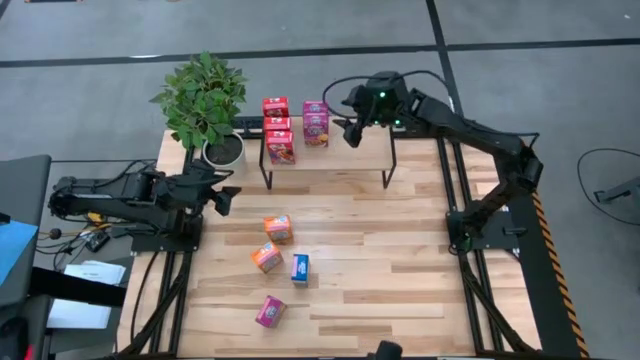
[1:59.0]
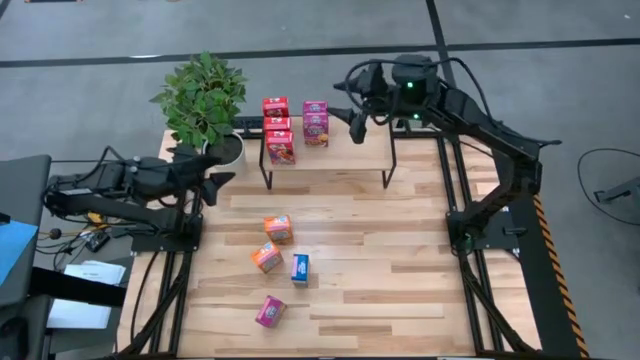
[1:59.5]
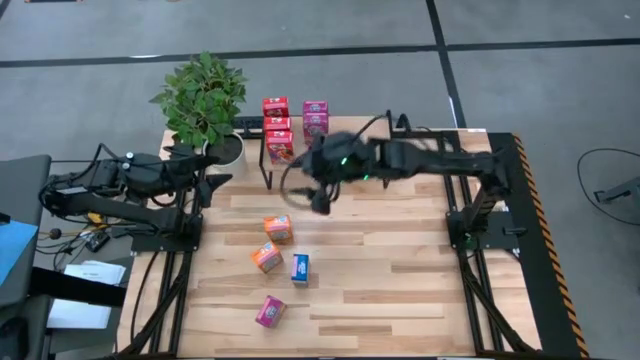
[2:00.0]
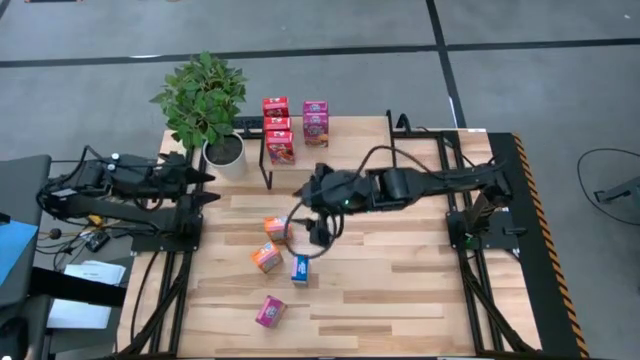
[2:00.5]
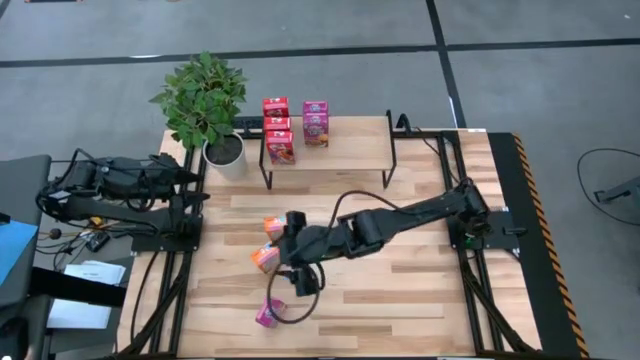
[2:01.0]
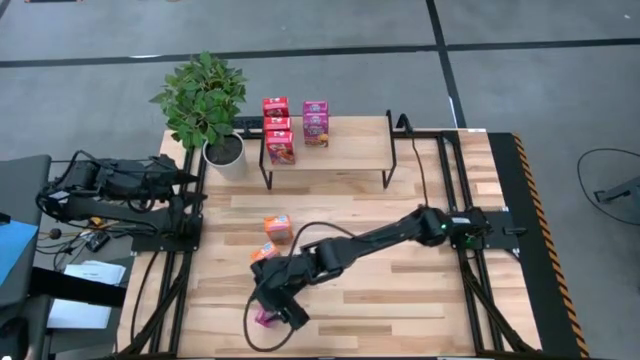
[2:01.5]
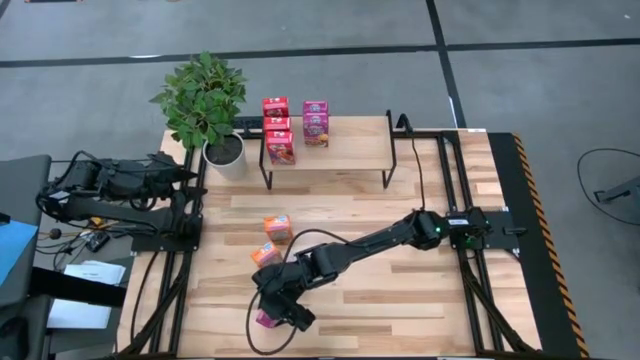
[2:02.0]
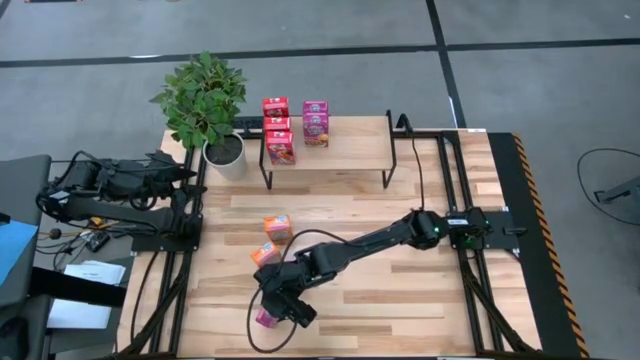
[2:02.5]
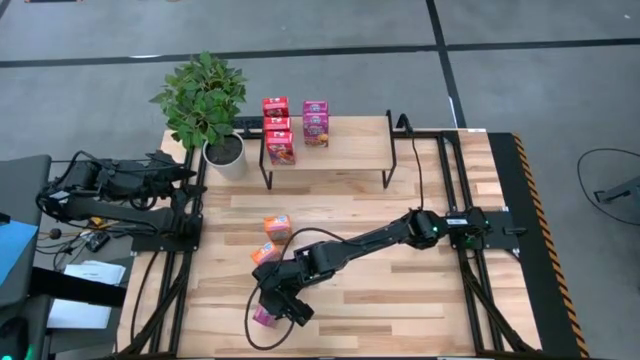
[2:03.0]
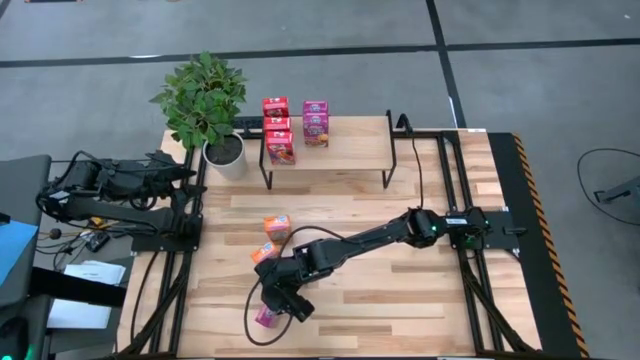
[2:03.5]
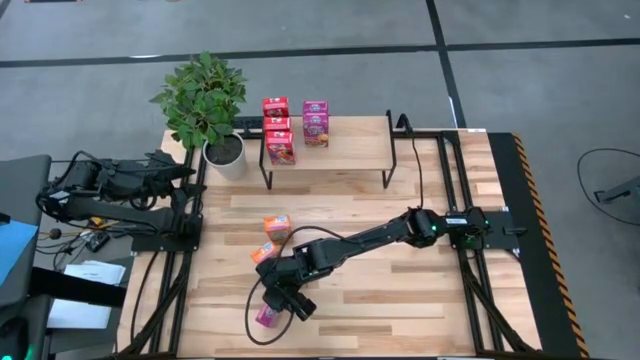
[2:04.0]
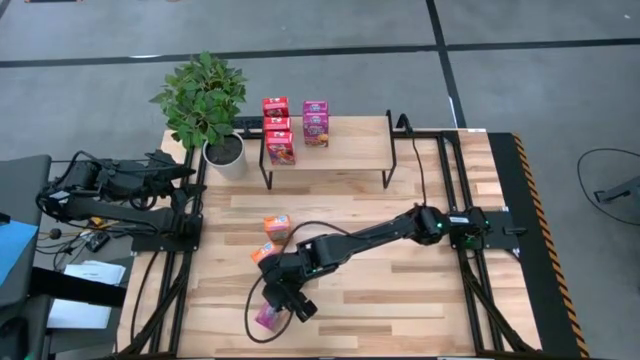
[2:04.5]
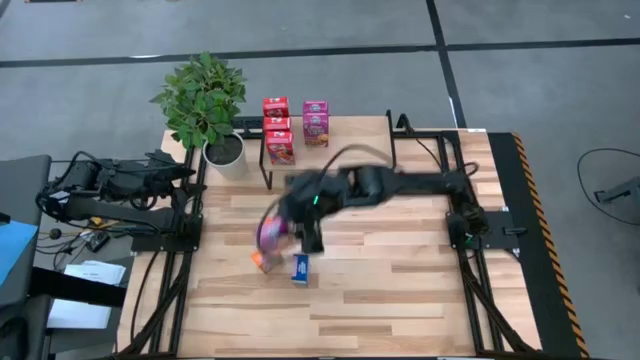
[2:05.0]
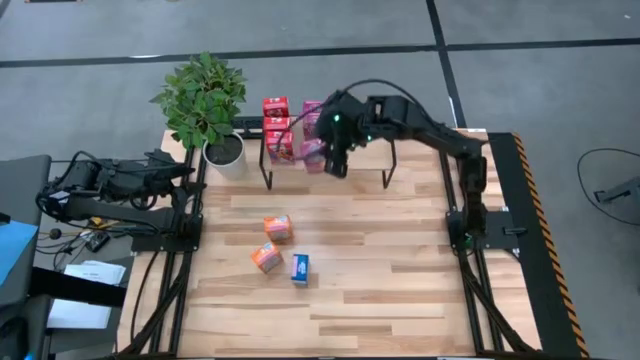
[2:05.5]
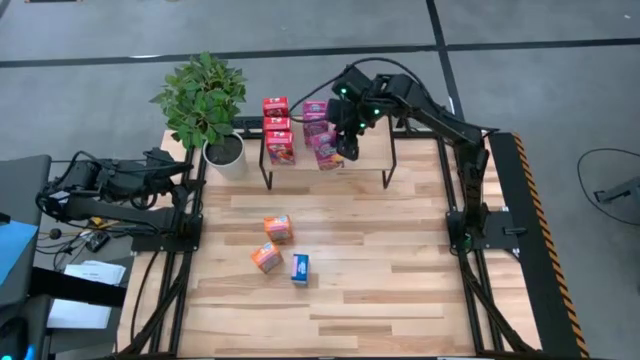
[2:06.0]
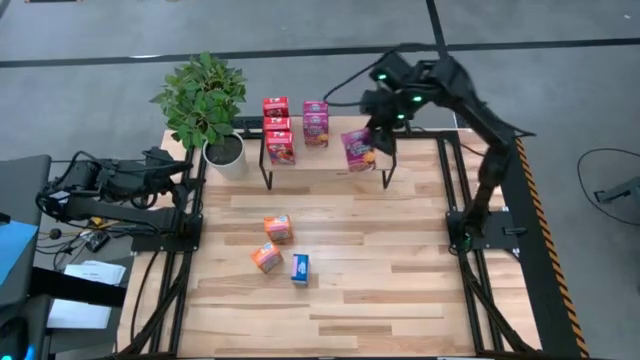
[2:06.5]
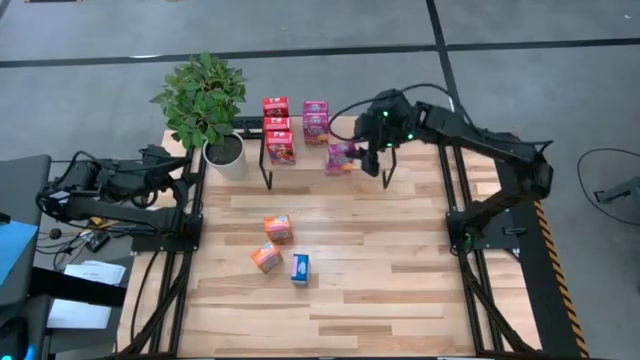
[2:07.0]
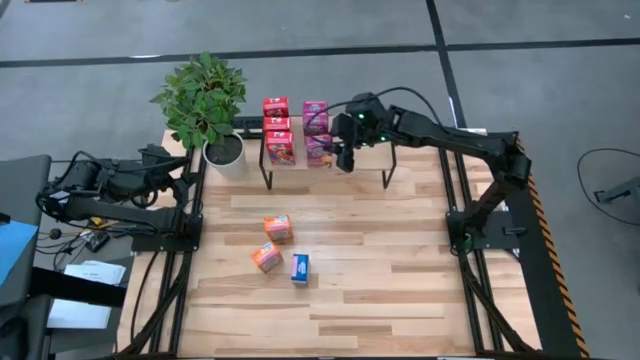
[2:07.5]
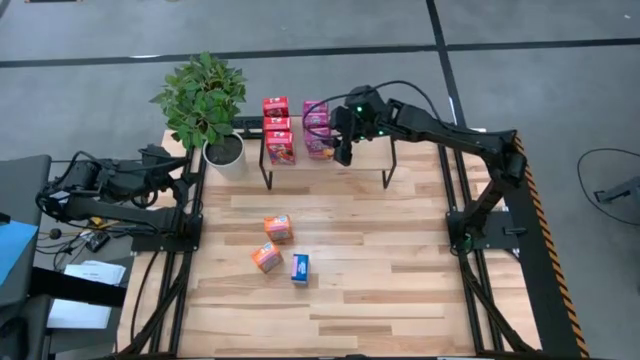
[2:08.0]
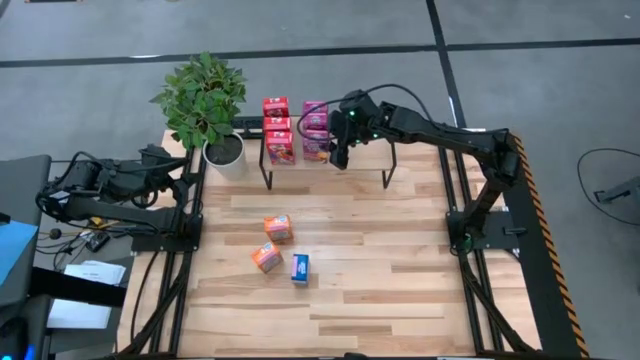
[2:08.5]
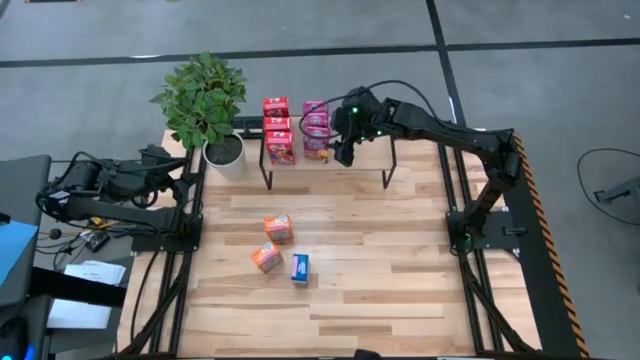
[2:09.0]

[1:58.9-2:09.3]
Task: Stack cereal on shelf
Put the violet cereal box on the shelf aligned with the other violet cereal box on the shelf

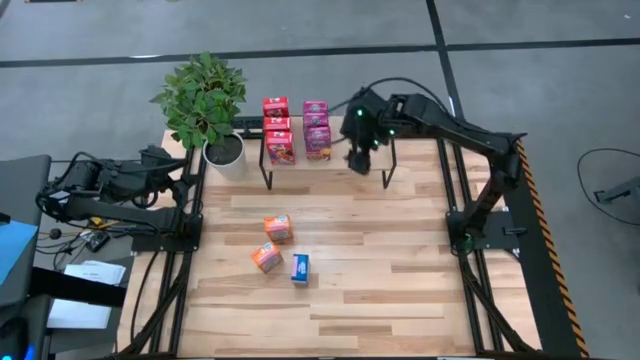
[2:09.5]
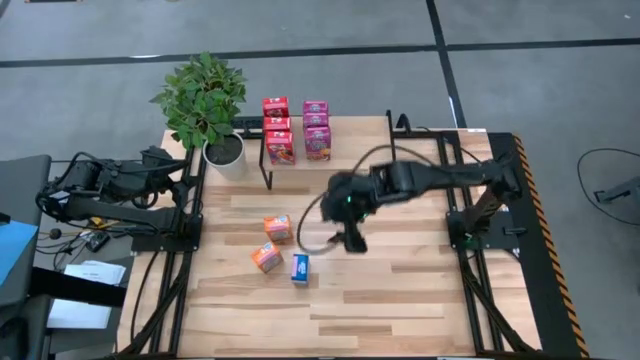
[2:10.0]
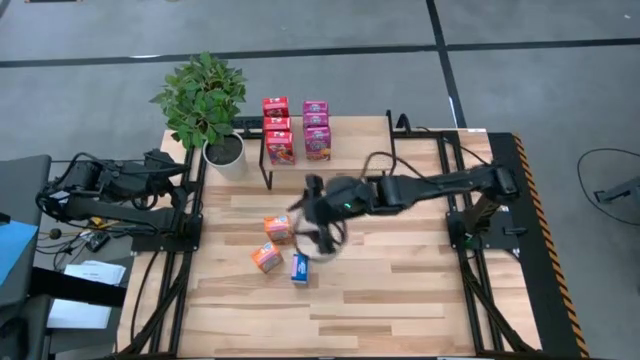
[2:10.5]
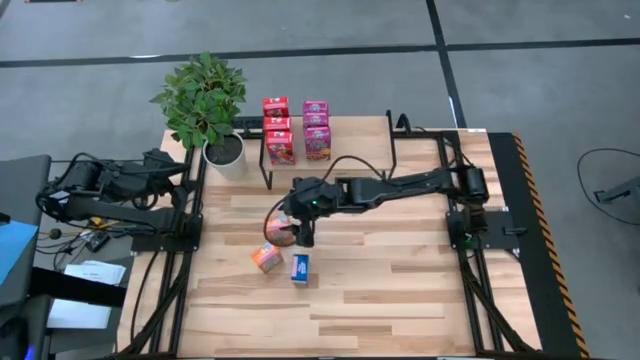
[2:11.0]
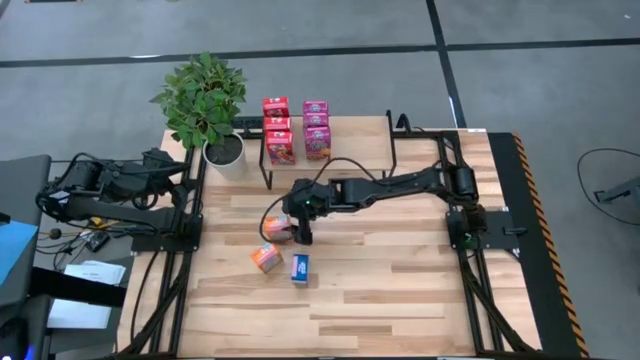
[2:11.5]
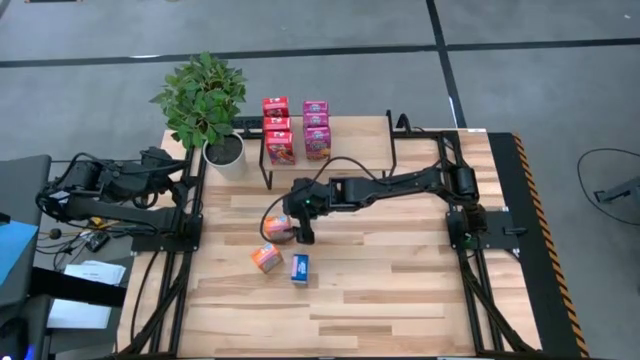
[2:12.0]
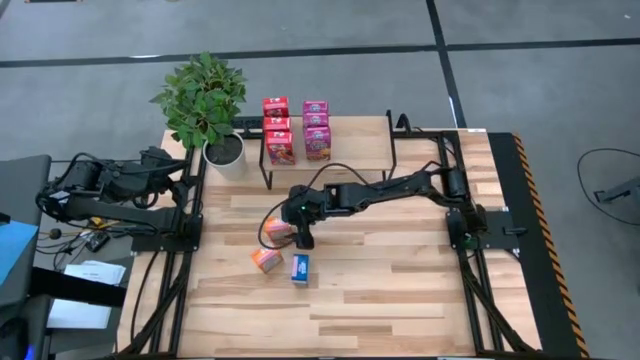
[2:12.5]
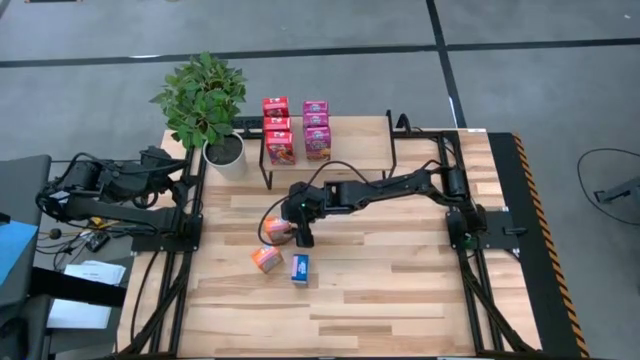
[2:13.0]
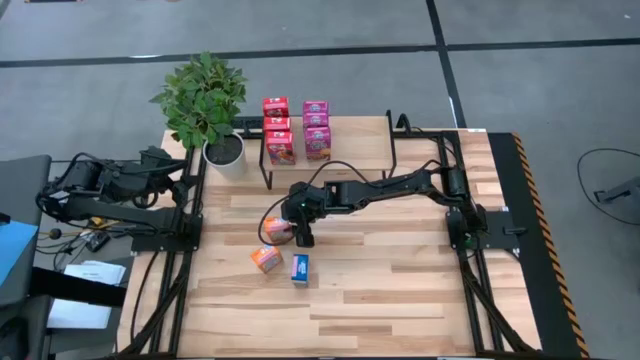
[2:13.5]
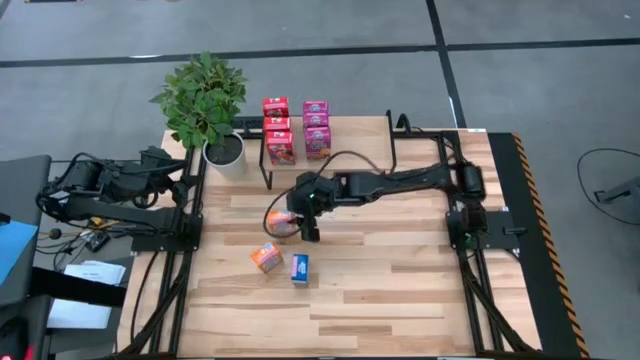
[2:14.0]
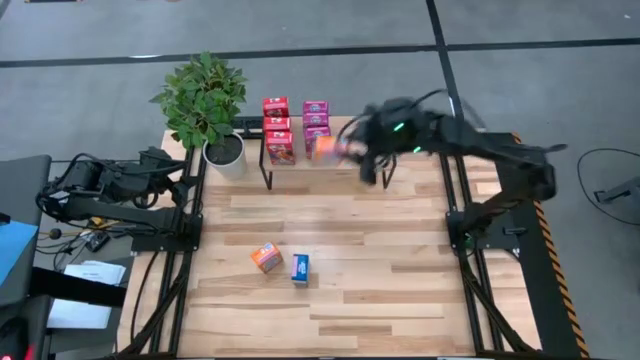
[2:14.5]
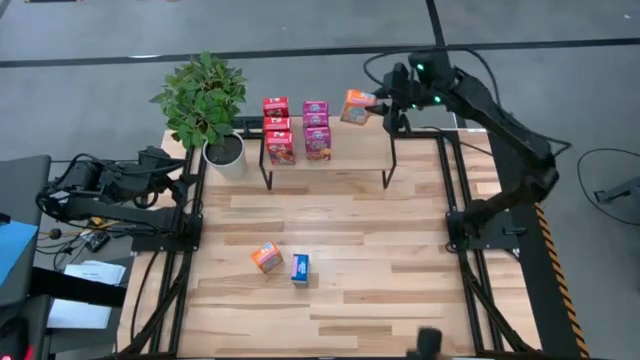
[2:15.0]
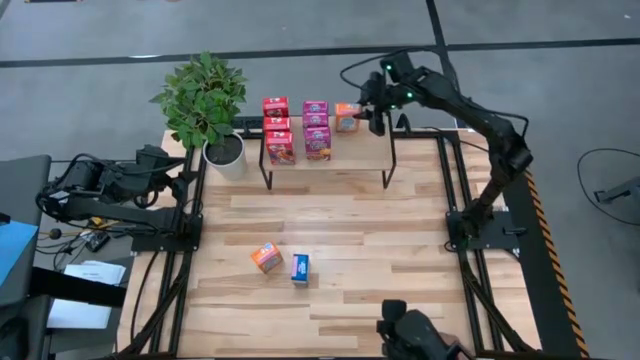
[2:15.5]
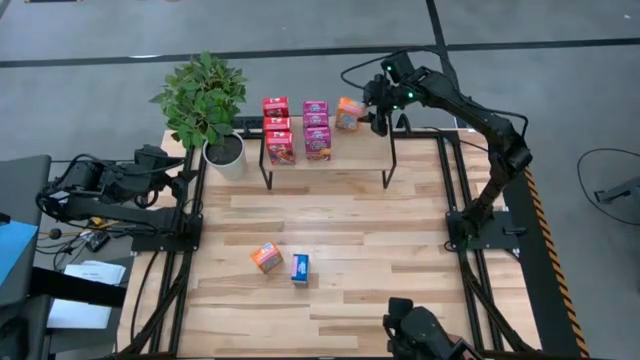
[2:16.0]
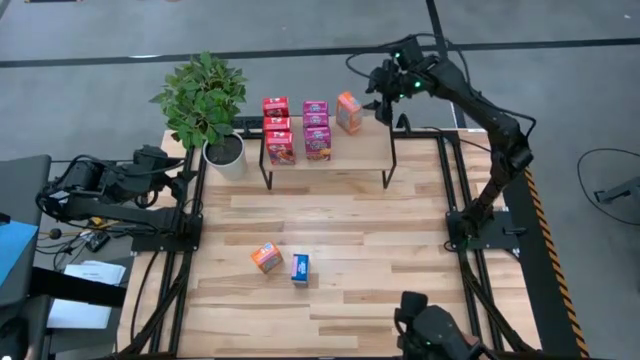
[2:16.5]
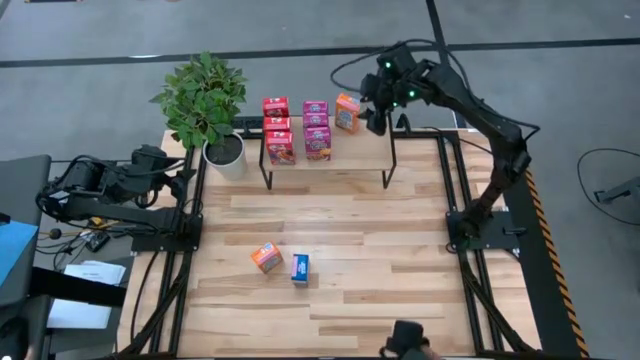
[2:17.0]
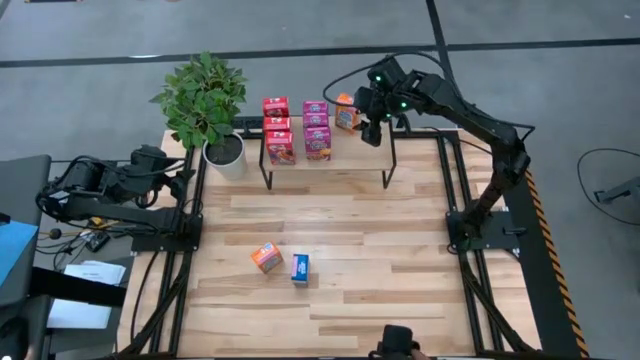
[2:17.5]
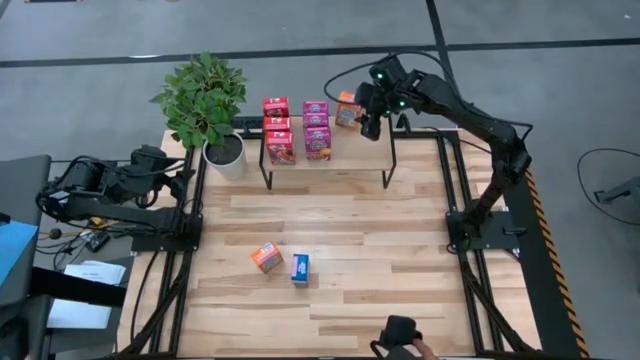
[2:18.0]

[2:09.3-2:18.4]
Put the top orange cereal box on the shelf

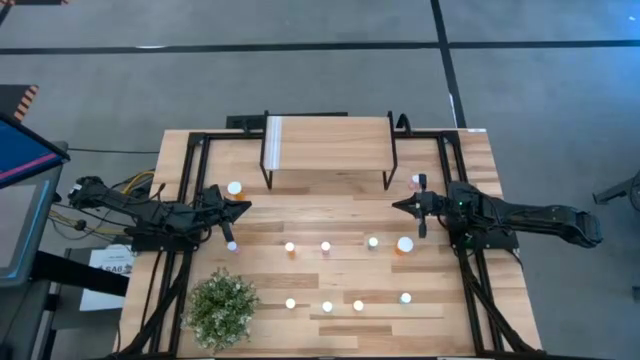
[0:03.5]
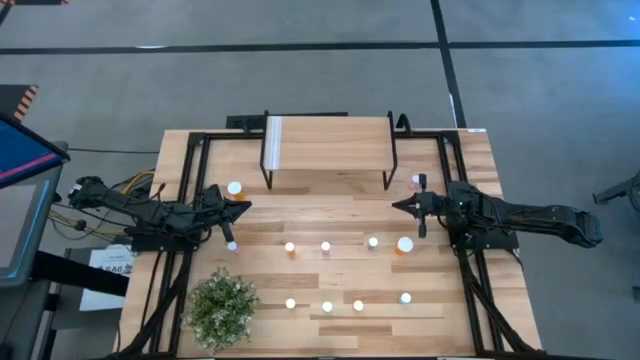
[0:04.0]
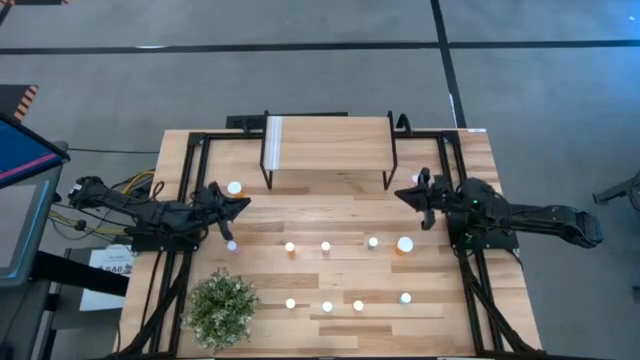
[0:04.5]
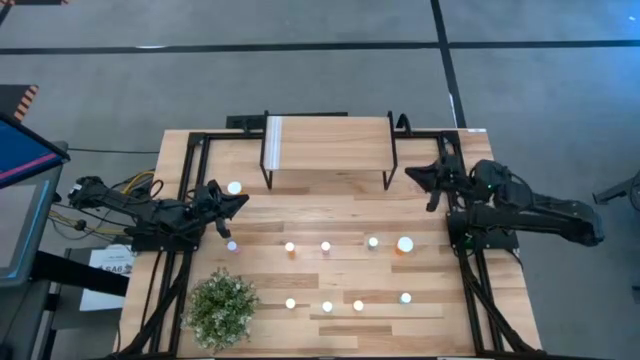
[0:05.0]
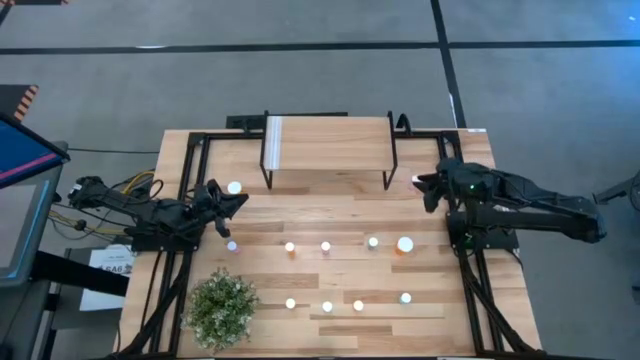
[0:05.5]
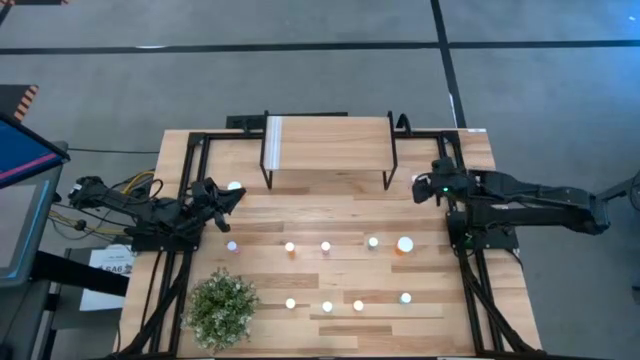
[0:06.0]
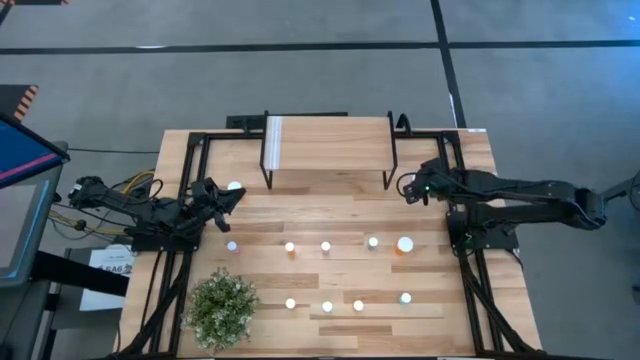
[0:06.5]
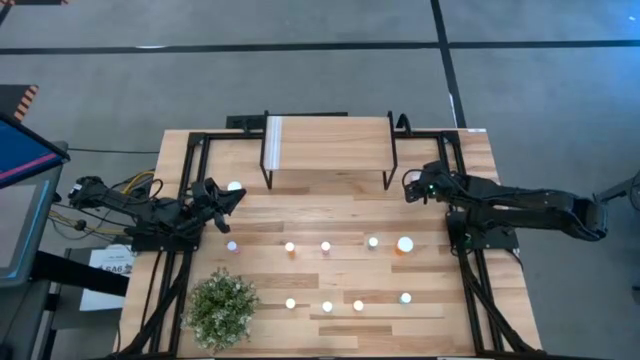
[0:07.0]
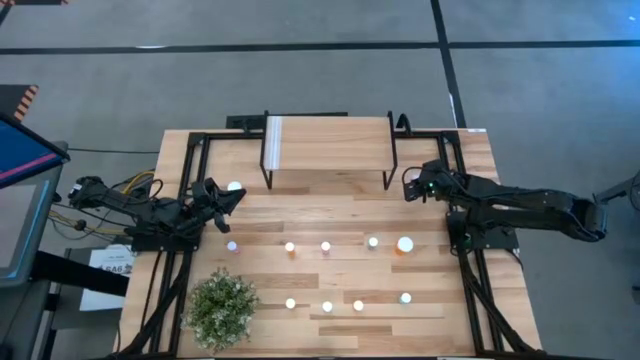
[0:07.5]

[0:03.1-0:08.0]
Task: Pick and place medicine bottles onto shelf by color
Put the small pink pill bottle on the shelf
